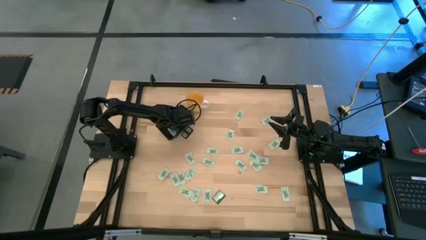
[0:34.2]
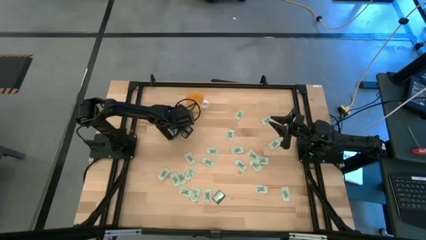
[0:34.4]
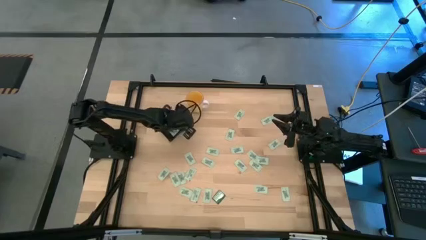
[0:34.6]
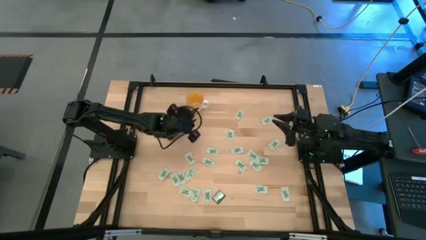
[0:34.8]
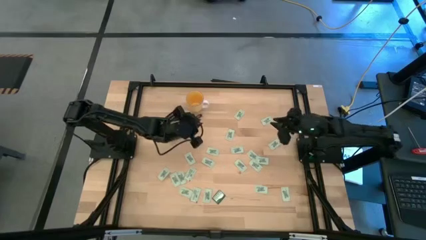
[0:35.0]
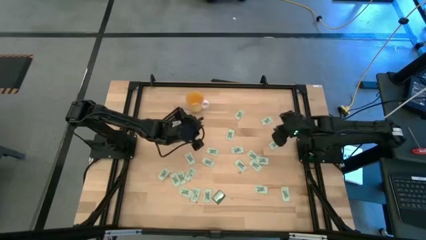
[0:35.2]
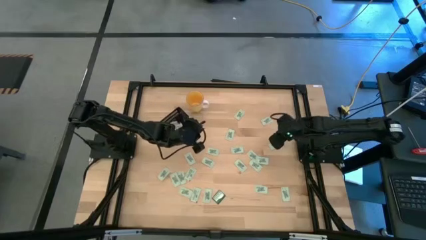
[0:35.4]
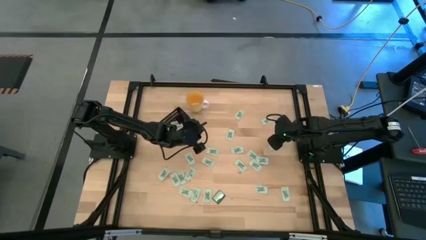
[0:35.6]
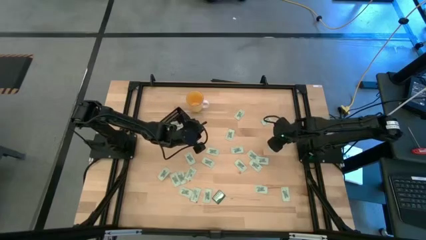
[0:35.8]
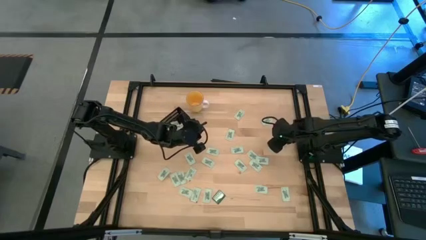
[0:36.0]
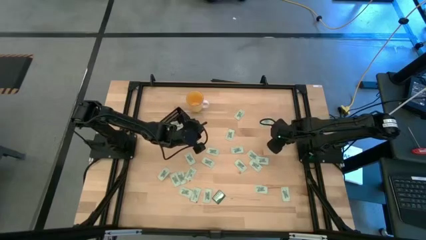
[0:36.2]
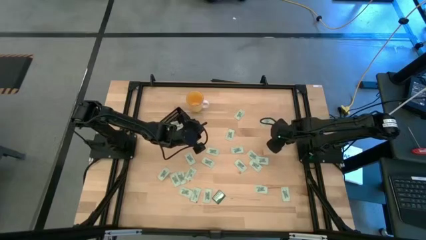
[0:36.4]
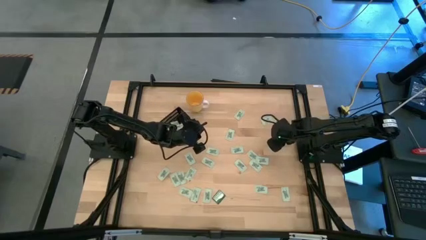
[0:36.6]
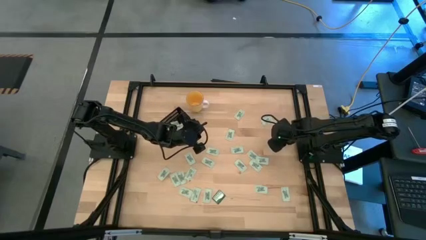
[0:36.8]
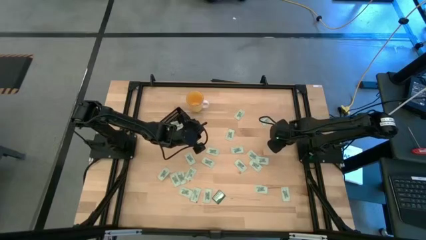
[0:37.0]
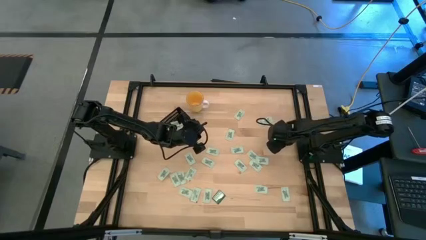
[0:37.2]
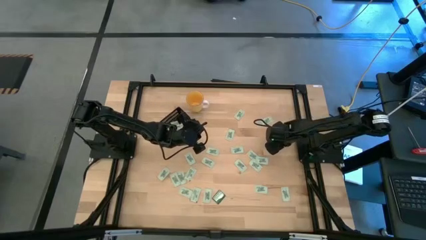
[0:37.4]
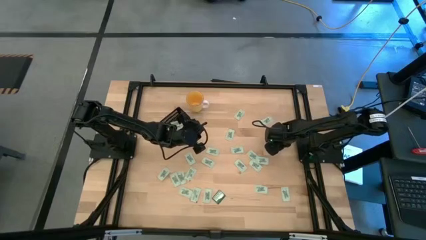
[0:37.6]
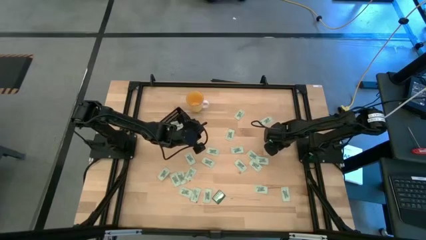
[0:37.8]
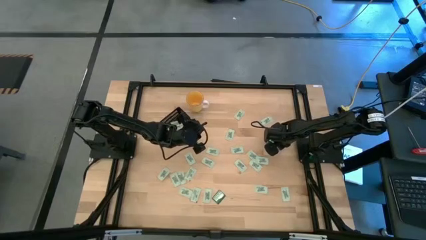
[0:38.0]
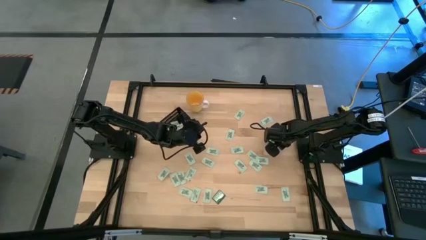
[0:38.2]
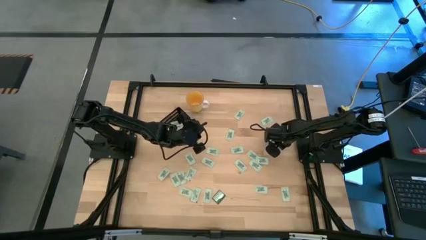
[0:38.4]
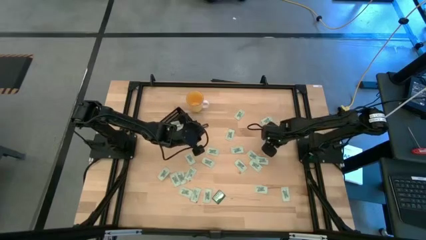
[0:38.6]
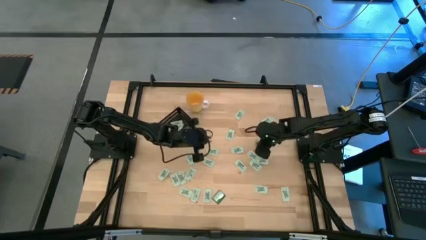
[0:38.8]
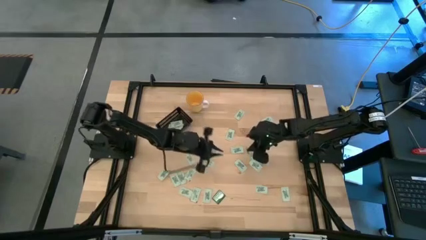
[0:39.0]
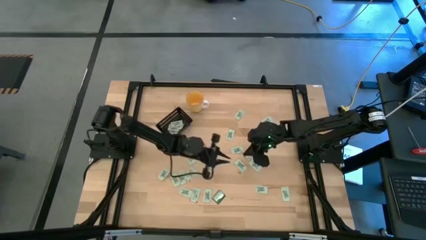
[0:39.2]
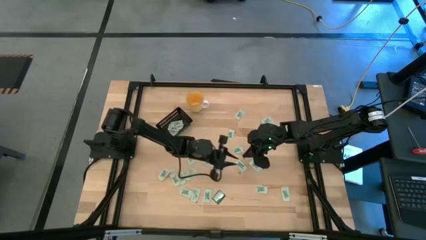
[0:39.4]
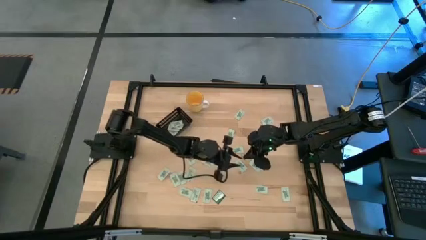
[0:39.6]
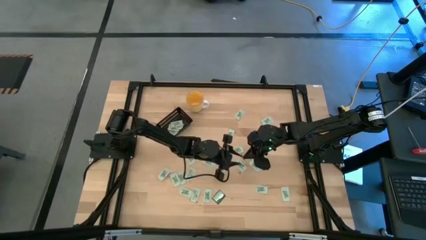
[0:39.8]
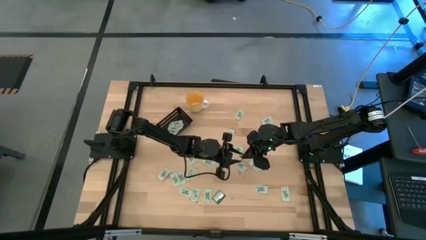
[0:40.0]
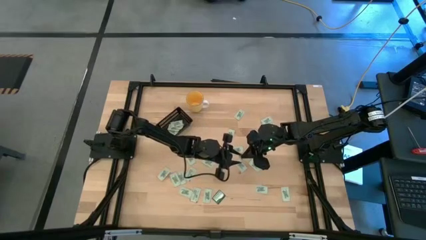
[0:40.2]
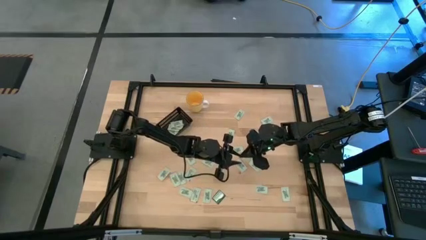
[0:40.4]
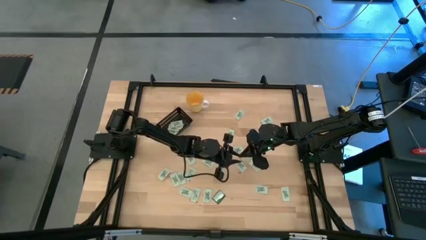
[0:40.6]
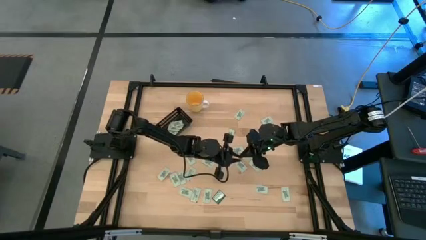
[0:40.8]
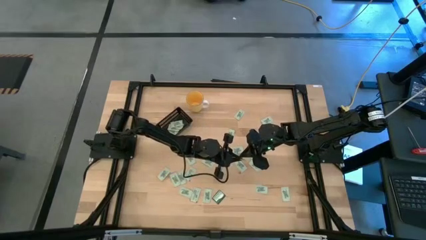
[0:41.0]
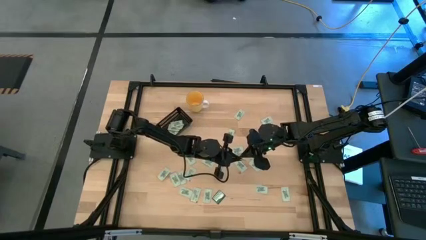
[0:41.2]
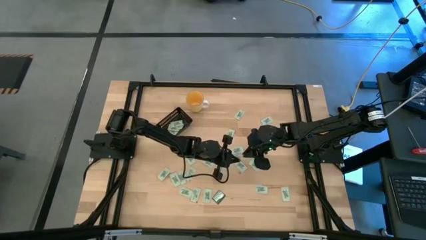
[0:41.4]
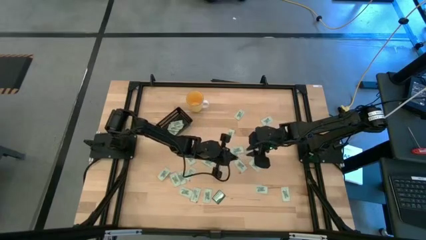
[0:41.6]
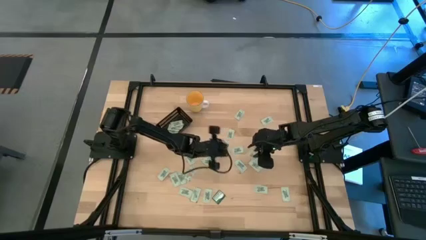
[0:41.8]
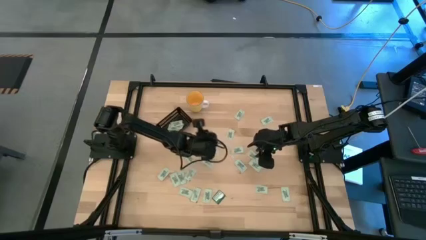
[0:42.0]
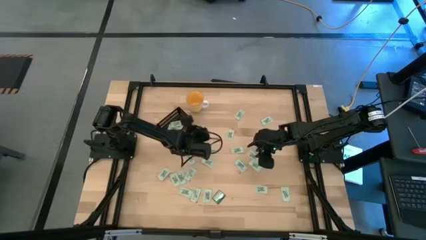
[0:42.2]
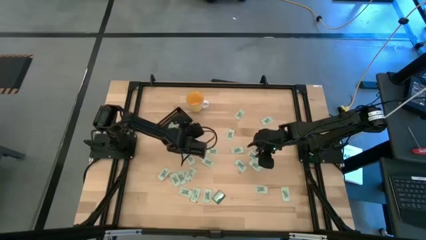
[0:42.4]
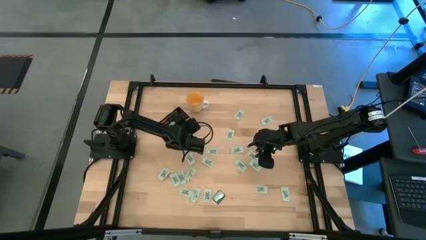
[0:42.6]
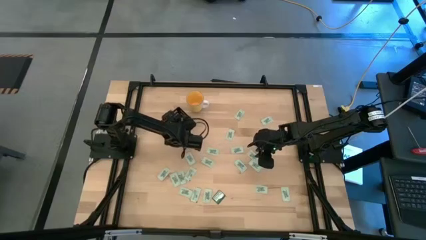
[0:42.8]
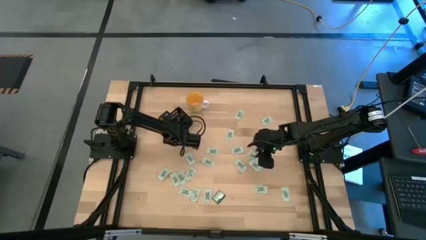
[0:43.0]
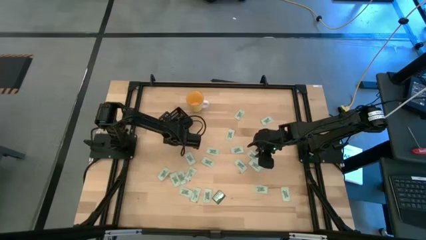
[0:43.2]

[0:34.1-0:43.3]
Task: Pick and place Stevia / Truvia into bins
Put the green stevia packet into the black bin

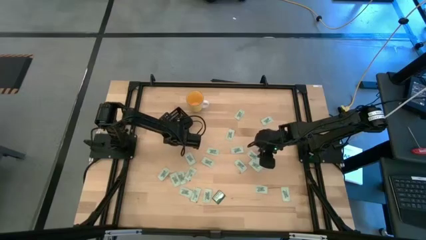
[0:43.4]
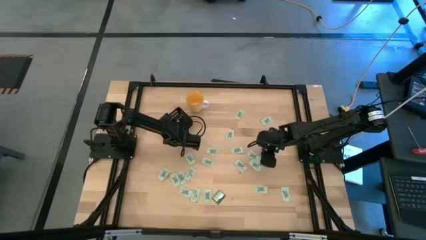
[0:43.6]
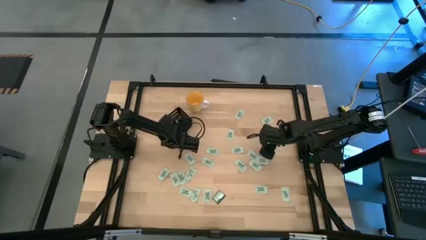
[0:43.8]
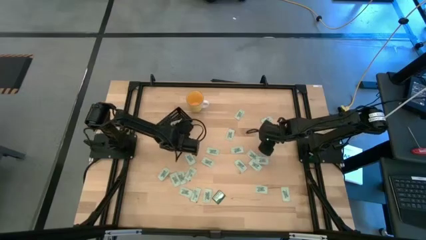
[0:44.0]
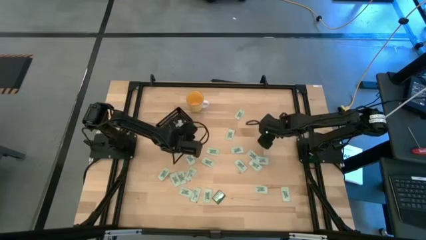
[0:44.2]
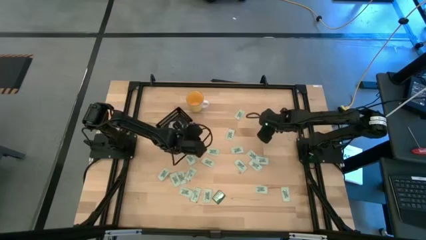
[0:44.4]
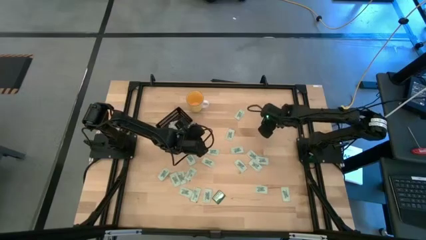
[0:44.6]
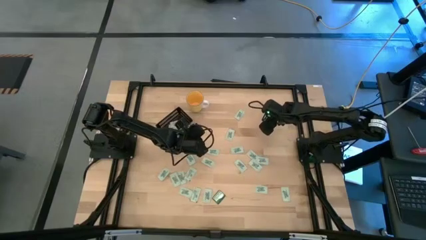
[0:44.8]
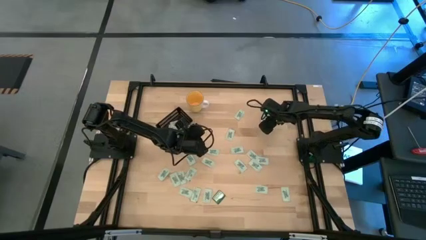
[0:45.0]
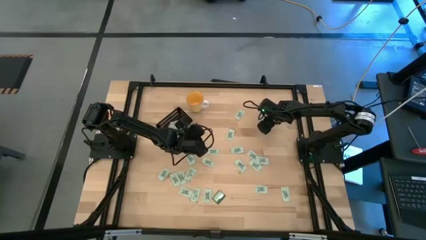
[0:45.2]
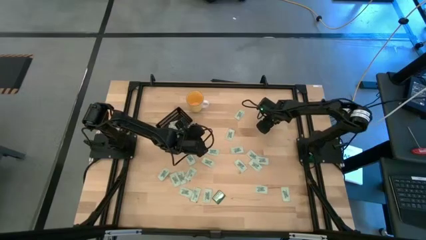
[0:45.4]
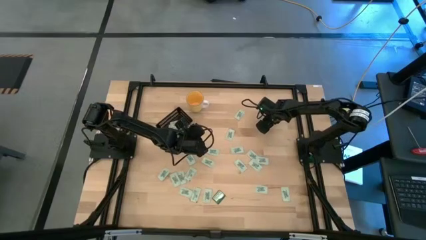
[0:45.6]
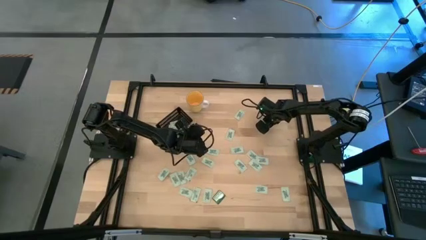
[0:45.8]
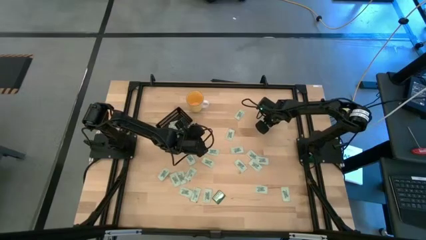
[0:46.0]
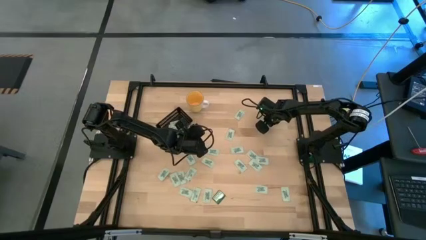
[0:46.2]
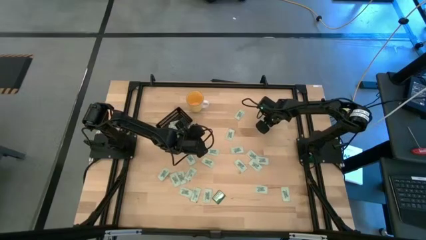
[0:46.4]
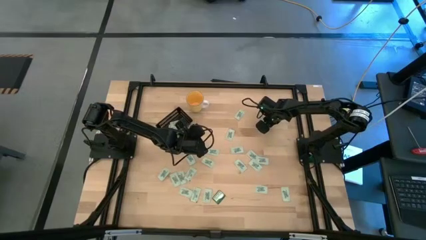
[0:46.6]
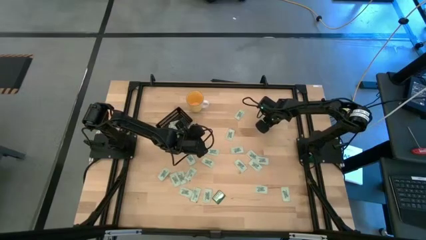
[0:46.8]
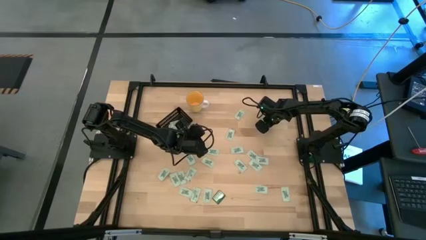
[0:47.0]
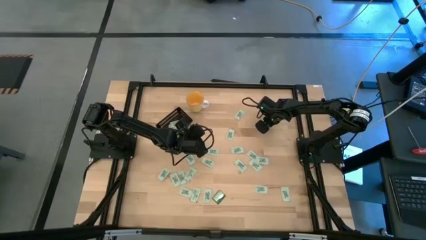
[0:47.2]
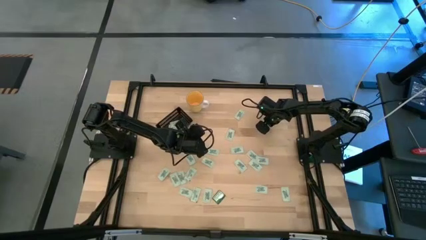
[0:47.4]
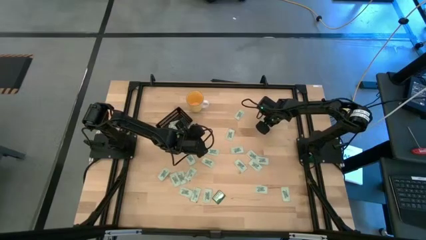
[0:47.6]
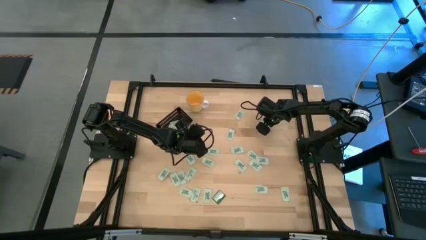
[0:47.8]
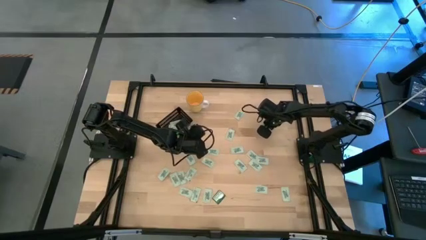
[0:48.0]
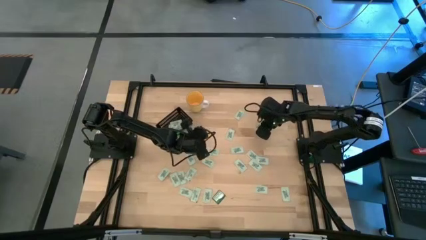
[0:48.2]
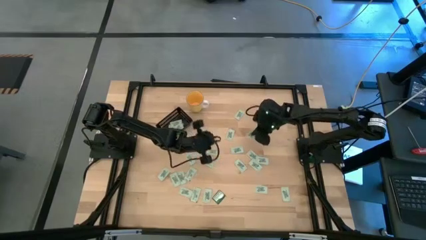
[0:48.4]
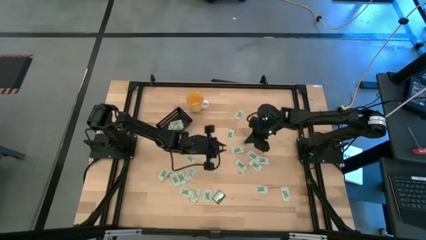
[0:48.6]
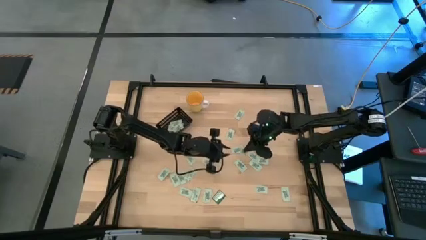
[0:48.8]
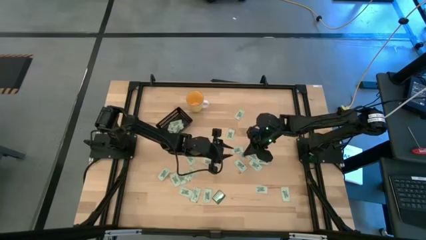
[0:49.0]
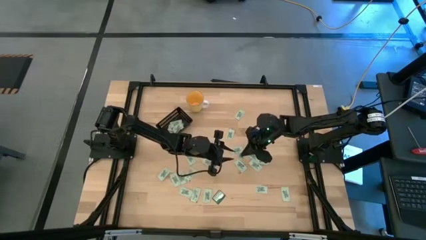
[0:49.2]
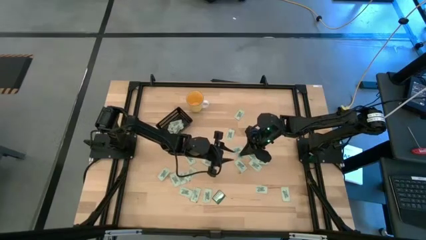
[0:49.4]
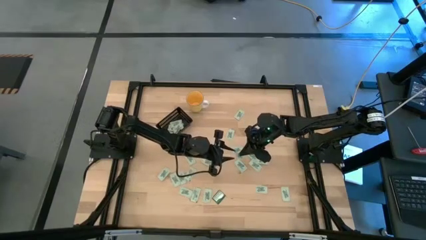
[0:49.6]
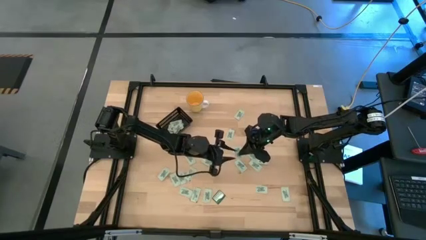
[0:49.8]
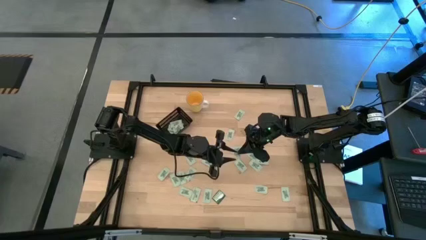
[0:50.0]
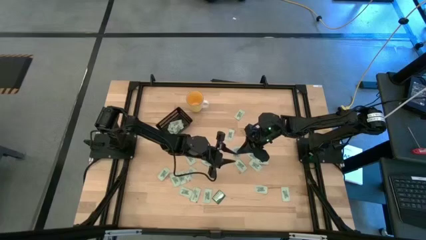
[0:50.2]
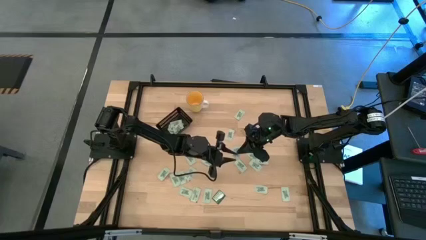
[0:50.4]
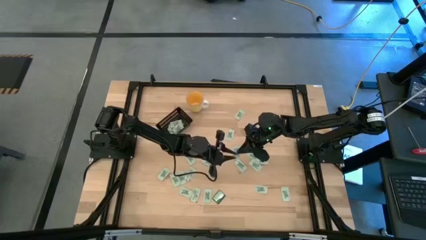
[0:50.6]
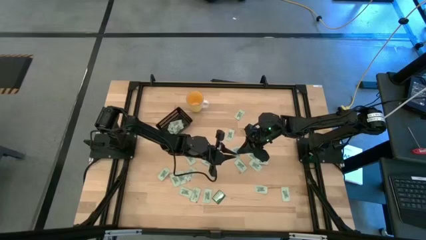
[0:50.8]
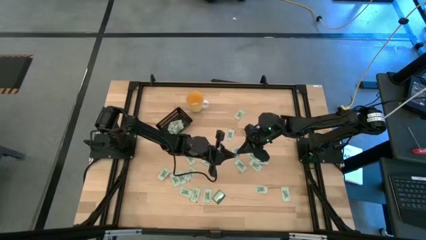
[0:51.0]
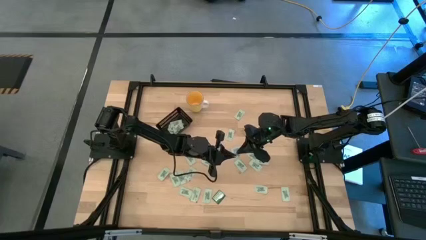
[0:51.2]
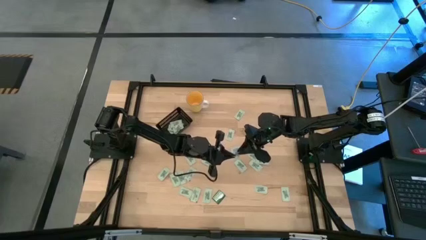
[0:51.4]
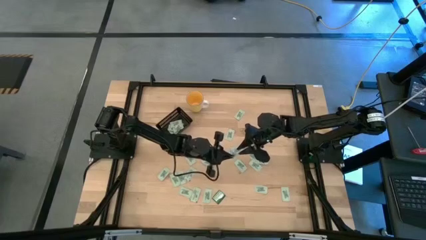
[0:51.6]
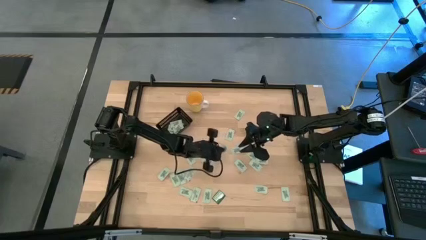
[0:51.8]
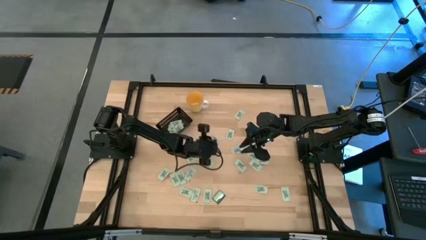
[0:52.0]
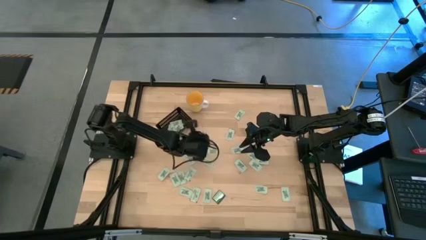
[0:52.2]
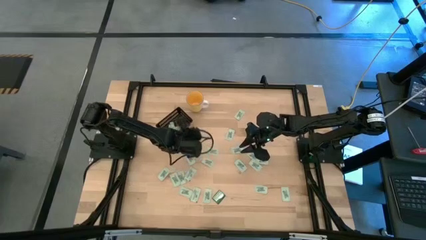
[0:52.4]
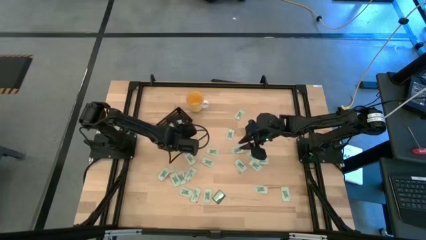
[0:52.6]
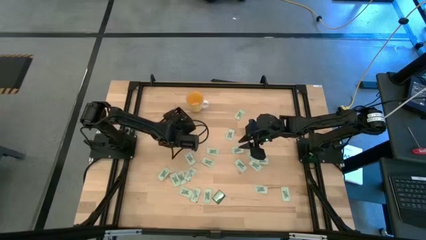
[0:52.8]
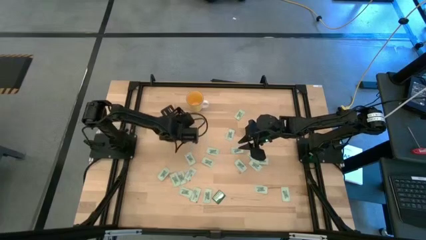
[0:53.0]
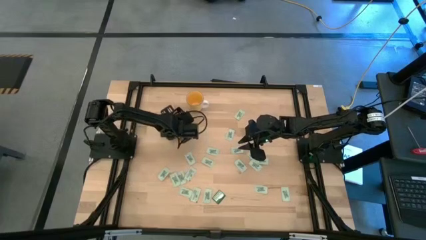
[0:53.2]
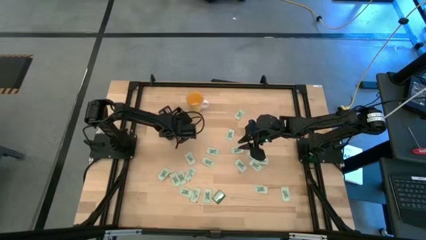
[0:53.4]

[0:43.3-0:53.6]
Put the green stevia packet into the black bin
